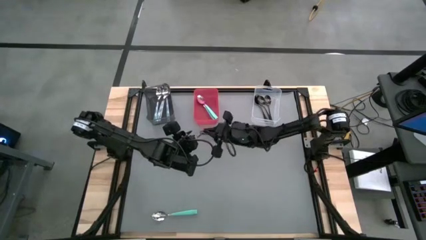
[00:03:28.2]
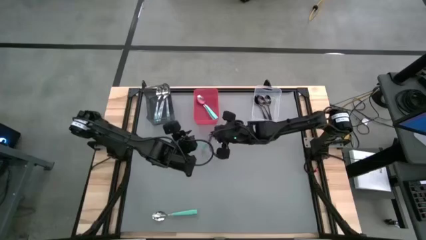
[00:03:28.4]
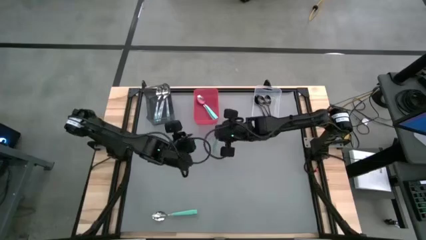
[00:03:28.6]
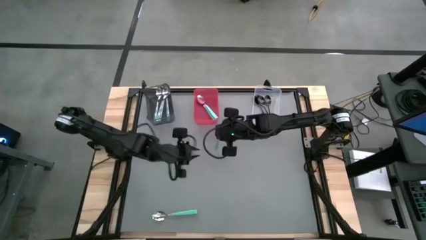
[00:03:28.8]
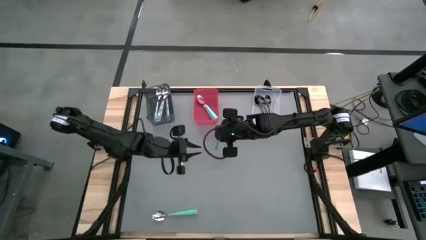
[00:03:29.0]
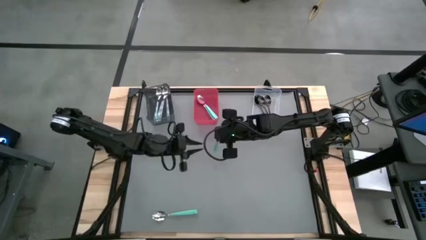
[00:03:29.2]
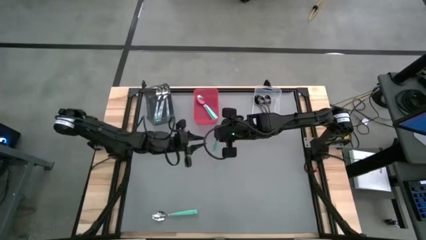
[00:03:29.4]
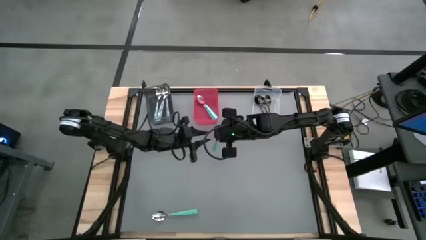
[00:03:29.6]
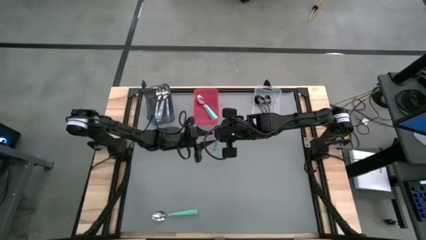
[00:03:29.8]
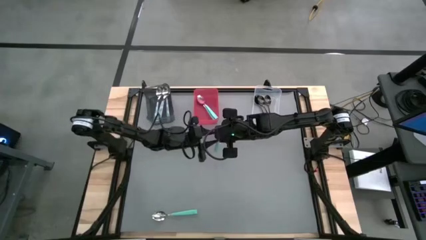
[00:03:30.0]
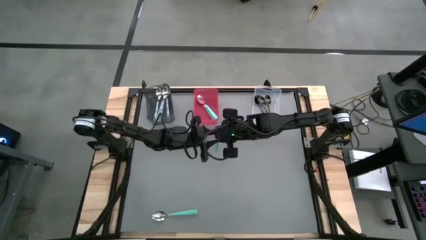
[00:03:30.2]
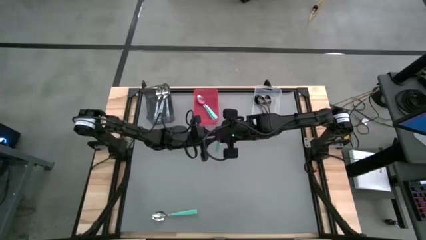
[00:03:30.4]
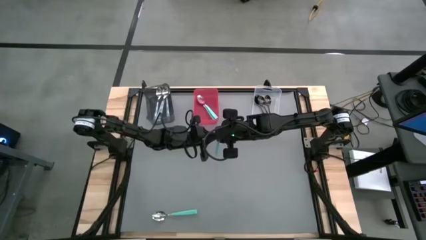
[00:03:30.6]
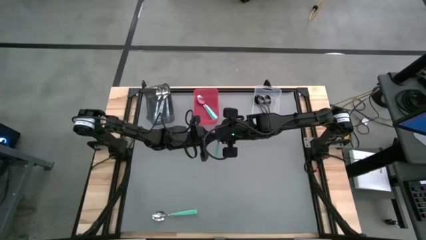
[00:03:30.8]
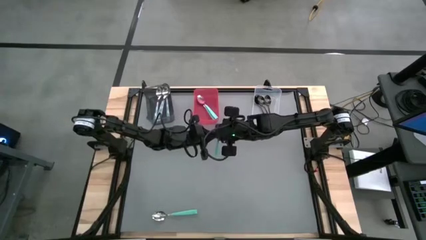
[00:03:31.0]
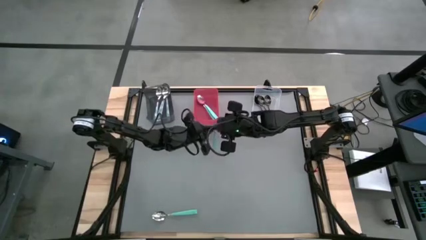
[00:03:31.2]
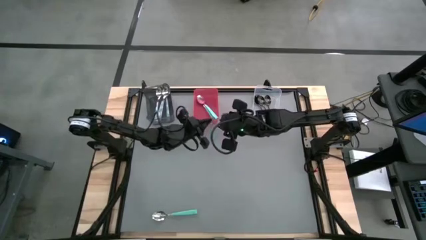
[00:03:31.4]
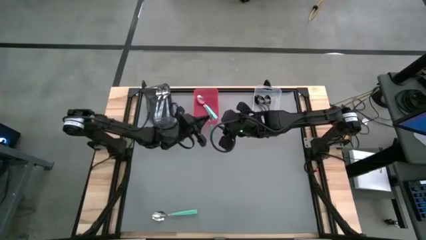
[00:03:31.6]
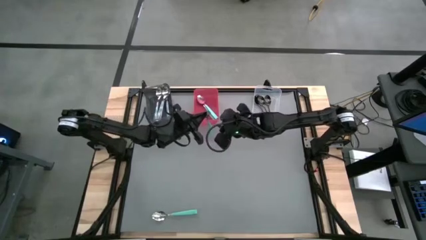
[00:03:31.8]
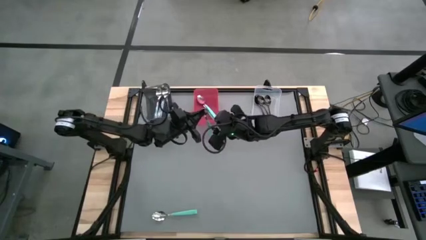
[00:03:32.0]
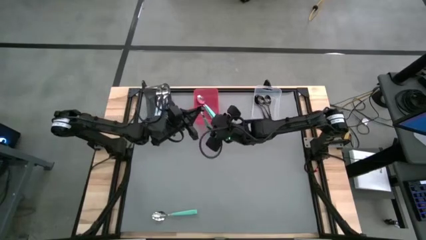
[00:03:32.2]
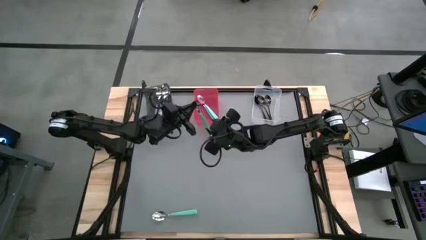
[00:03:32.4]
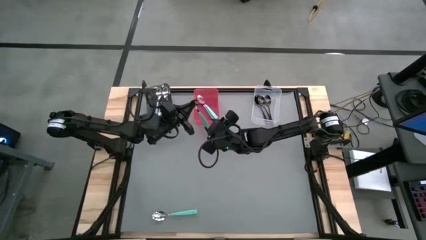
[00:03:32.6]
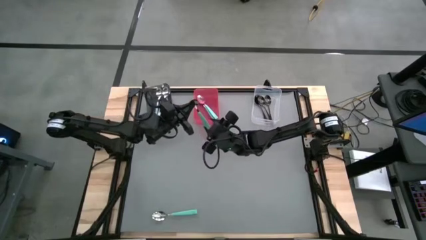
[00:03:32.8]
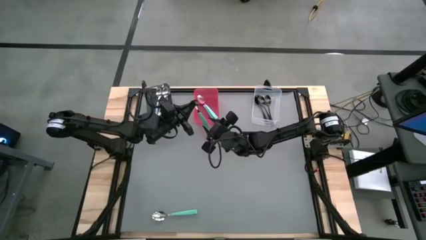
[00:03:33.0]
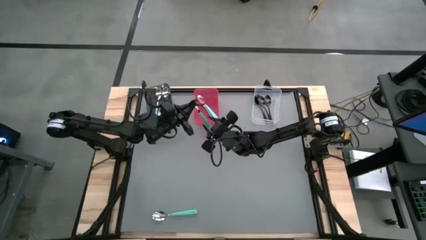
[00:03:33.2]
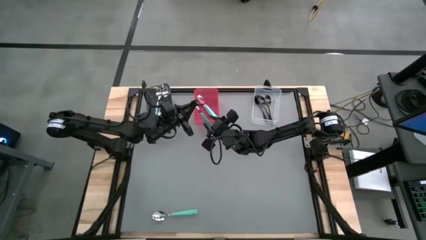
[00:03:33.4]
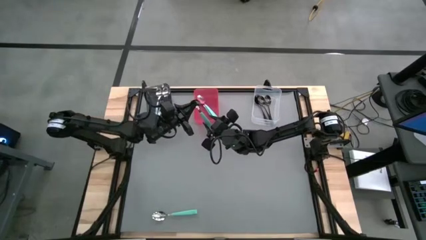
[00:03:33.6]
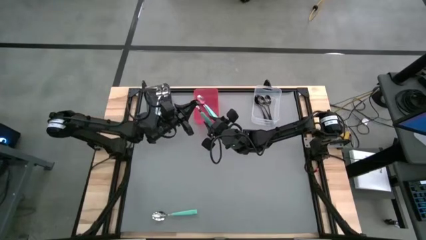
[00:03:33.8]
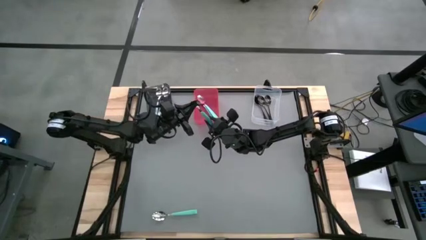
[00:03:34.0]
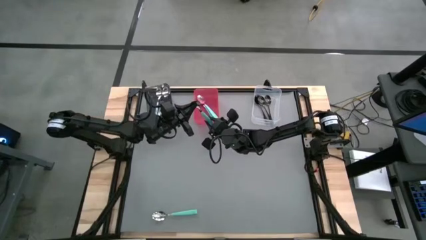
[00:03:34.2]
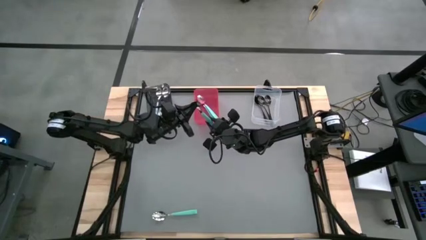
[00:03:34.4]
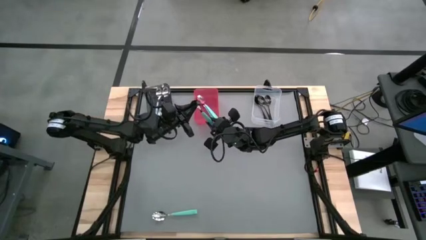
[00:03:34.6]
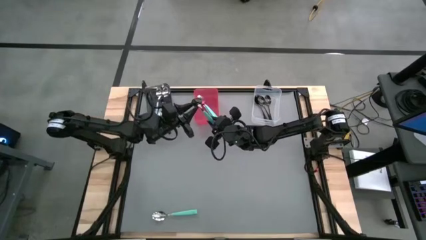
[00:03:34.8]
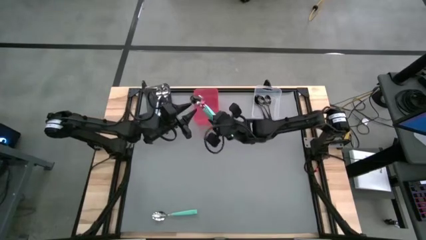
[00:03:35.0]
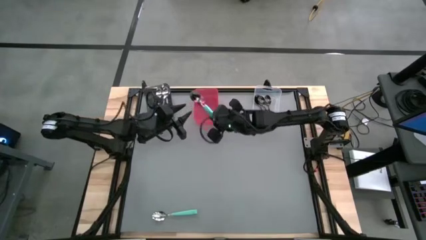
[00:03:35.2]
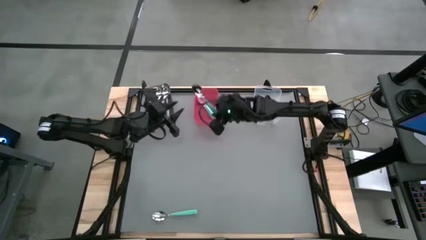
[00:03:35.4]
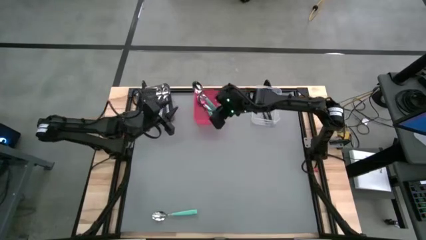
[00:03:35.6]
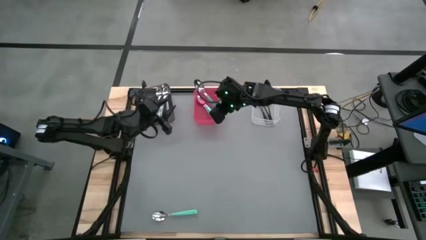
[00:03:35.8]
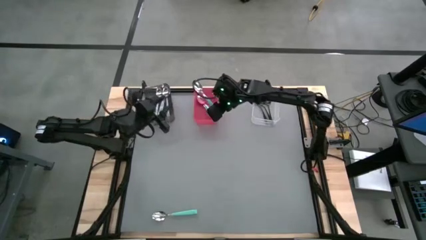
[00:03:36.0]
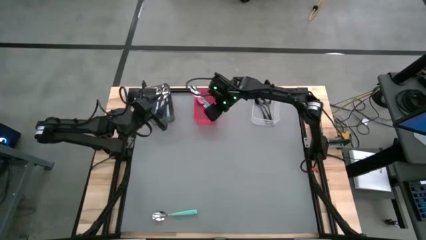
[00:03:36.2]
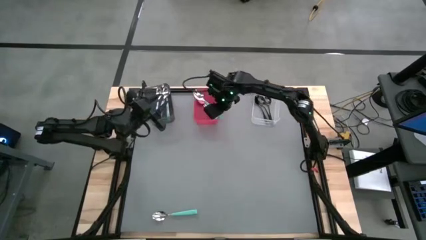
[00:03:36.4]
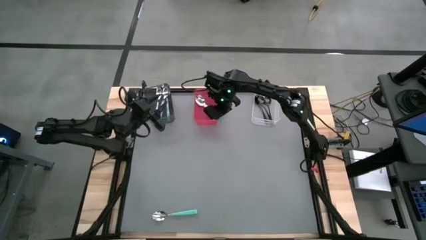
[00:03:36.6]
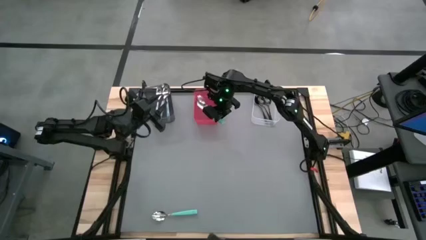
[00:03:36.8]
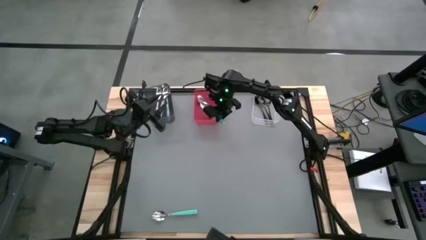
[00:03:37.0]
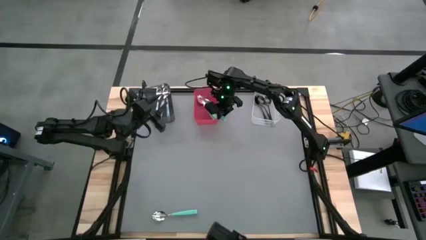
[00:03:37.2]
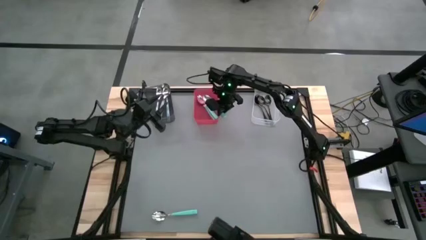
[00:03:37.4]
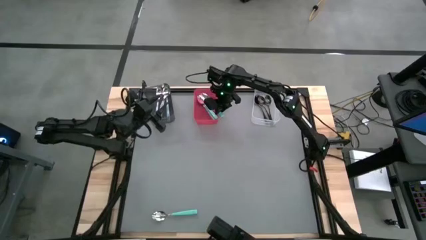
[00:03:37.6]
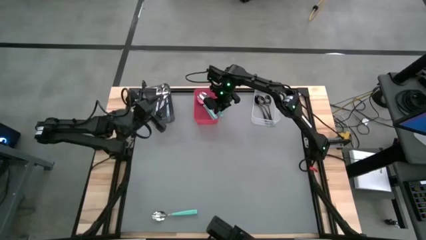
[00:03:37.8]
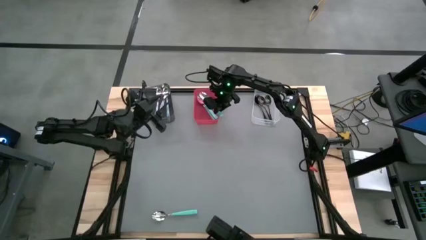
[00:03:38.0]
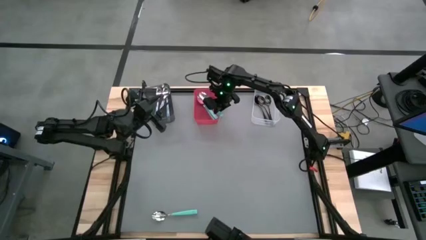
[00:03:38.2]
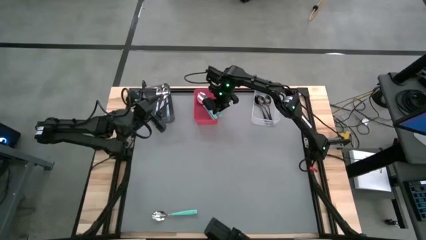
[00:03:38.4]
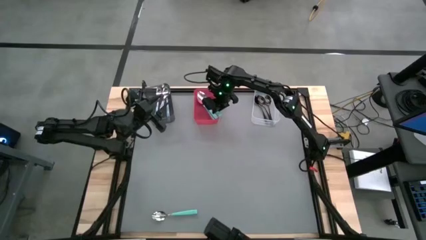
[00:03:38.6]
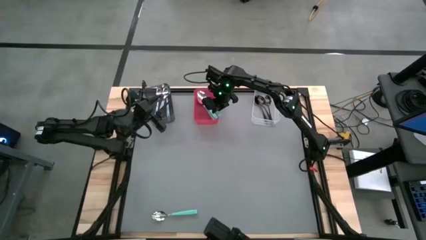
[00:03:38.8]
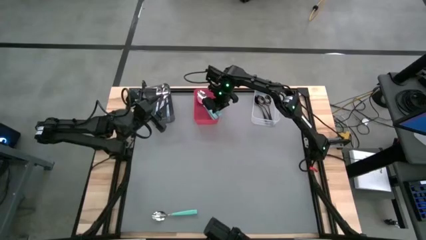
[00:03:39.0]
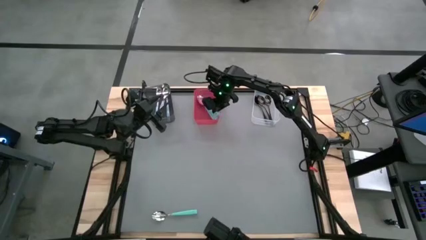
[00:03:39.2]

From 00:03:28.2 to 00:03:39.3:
Task: Sort silverware by color (type)
Put the blue spoon into the red bin

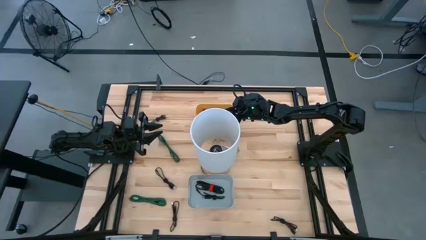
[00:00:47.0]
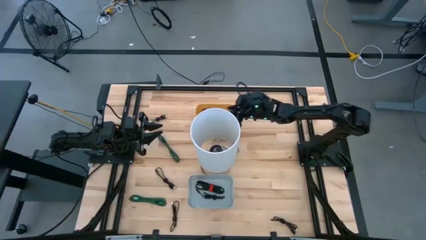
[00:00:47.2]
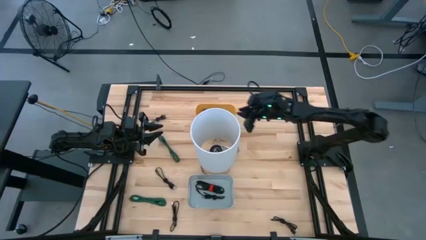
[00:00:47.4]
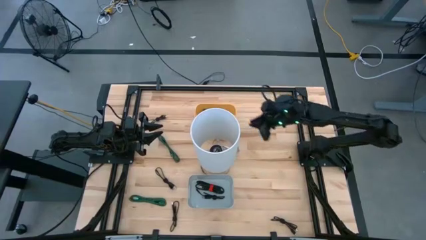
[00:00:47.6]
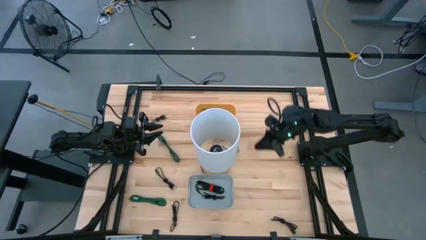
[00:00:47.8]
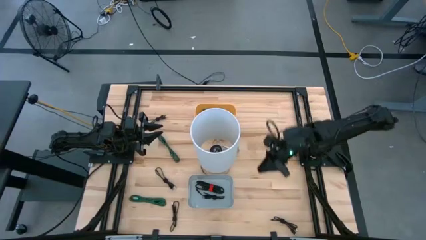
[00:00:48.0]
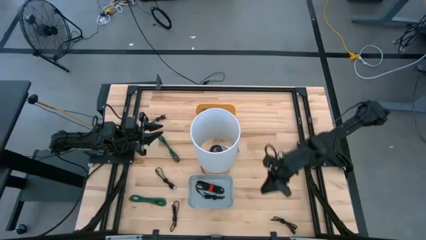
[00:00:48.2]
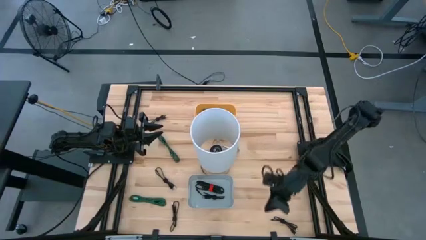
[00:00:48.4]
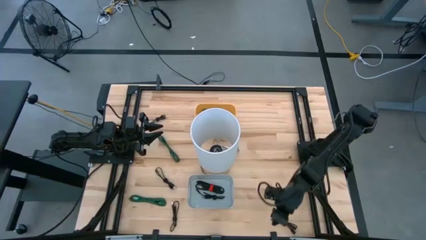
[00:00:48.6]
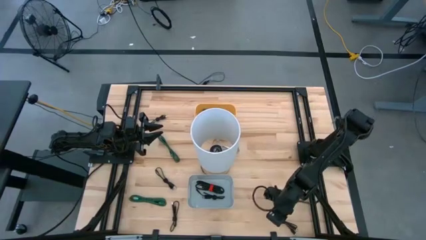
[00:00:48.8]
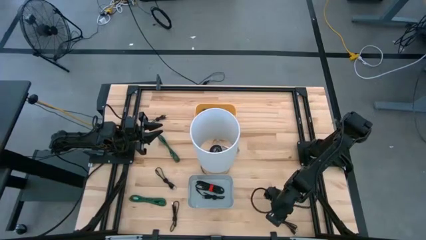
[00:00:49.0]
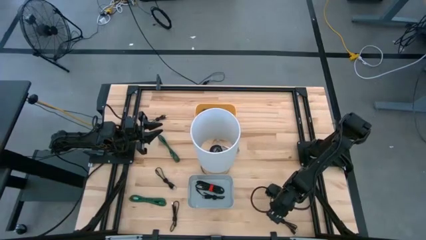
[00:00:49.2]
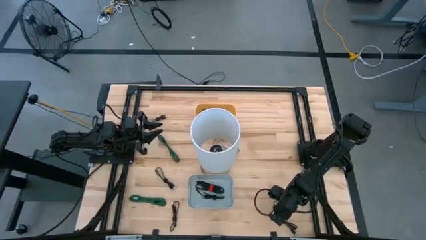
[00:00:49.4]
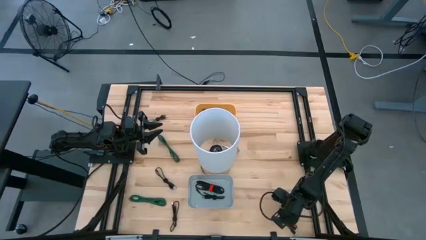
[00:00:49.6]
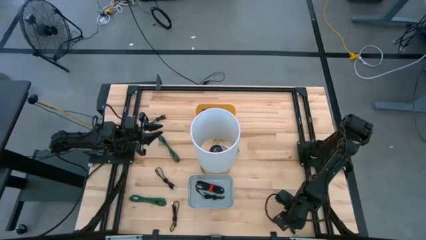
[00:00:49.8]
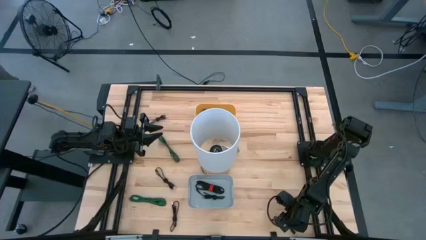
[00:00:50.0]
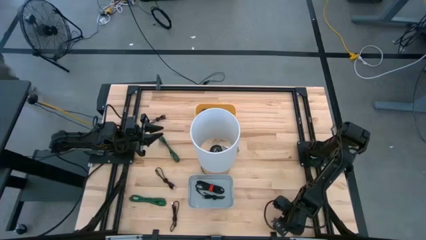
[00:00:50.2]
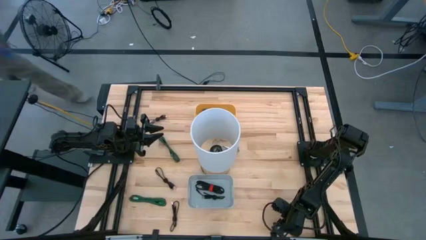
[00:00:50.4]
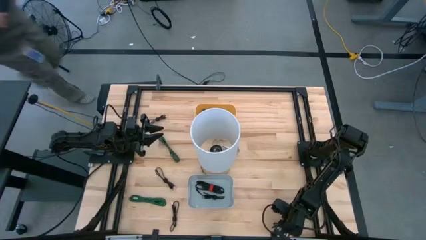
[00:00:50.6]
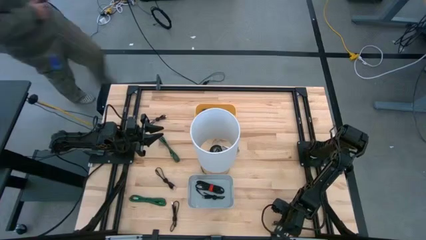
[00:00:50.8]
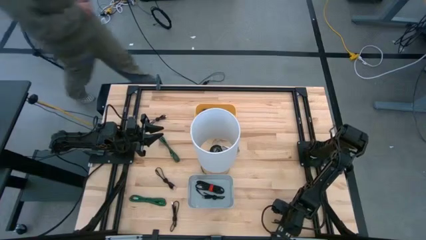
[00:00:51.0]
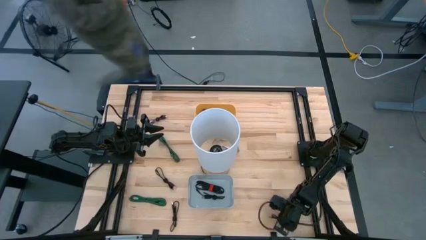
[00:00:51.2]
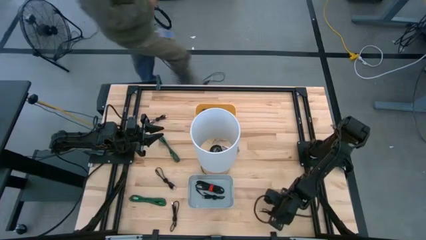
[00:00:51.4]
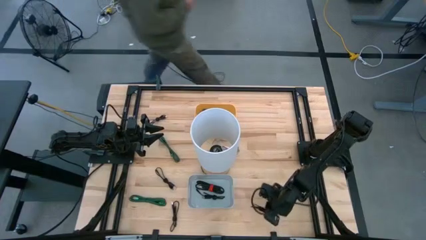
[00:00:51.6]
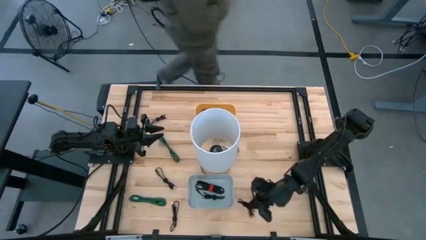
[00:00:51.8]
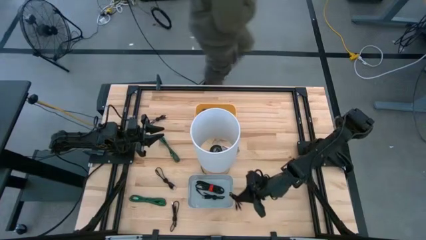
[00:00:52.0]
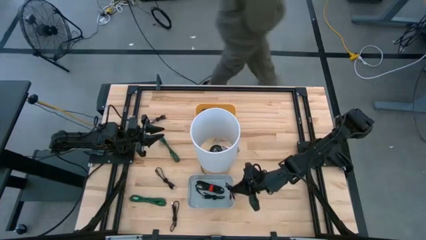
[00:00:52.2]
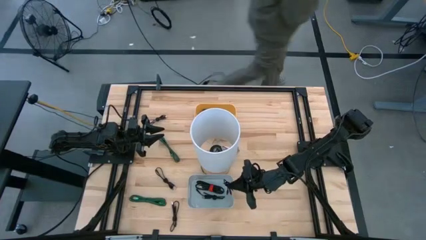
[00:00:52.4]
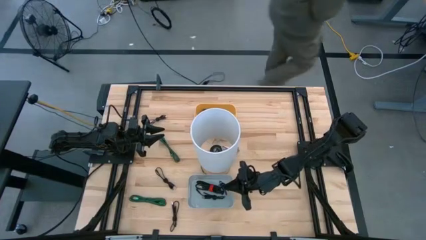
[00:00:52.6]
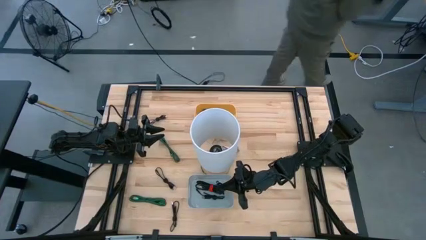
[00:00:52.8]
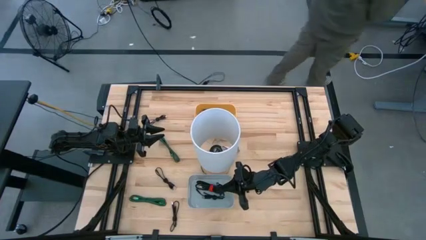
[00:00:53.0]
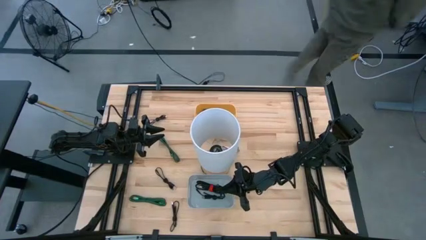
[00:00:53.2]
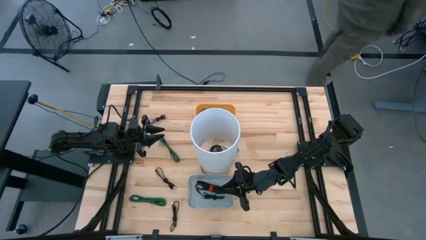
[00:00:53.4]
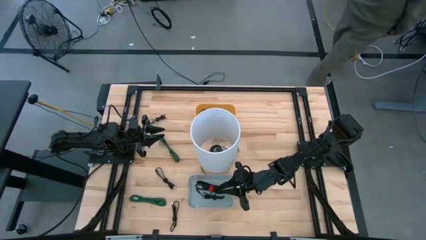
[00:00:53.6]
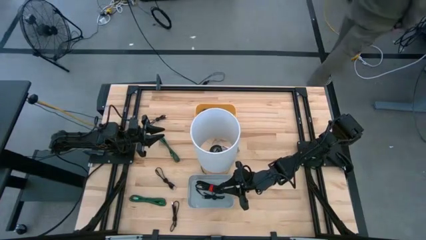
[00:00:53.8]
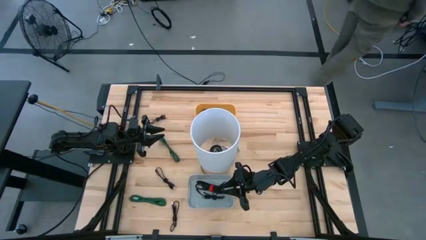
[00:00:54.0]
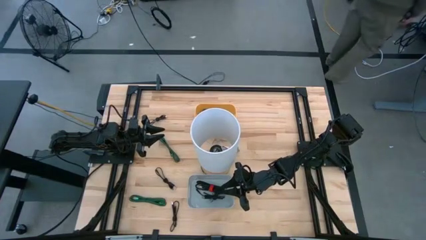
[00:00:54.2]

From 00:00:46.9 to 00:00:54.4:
Task: Pick & Place USB Port
Put the black charger cable into the white bin
